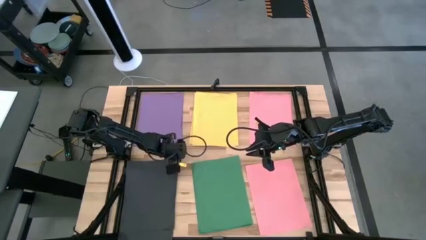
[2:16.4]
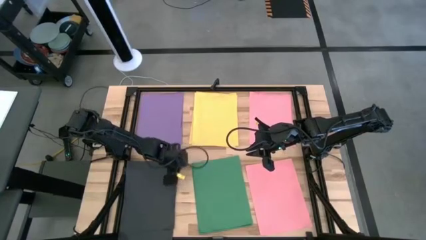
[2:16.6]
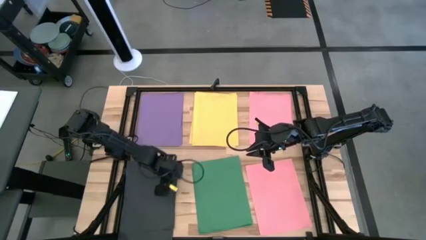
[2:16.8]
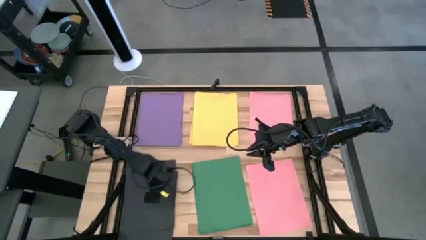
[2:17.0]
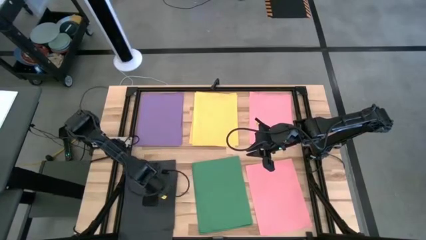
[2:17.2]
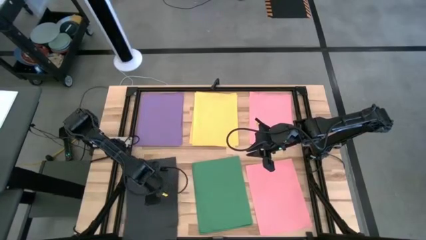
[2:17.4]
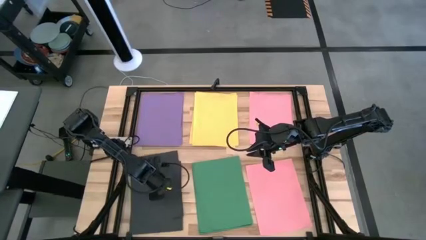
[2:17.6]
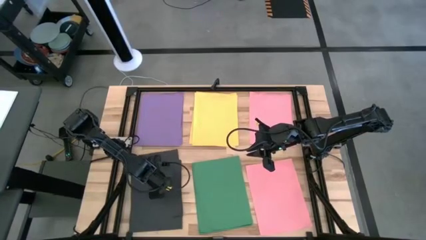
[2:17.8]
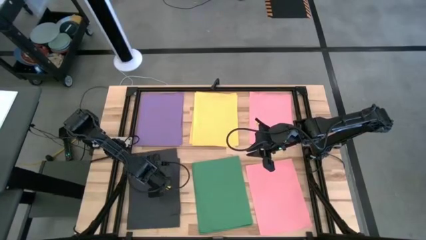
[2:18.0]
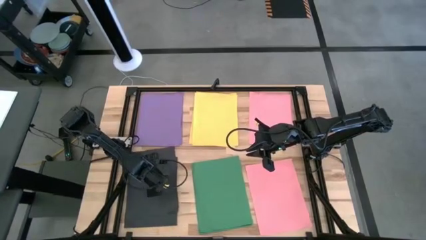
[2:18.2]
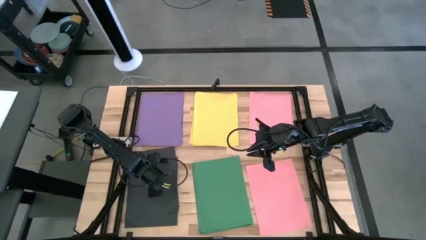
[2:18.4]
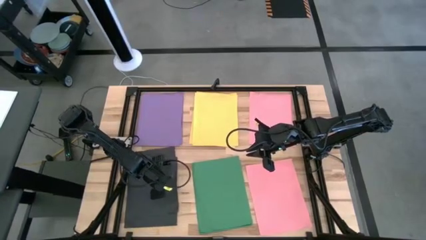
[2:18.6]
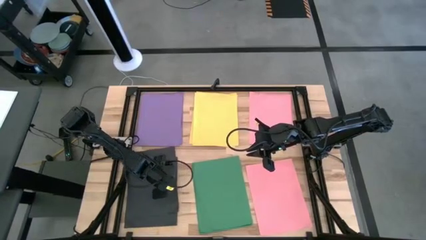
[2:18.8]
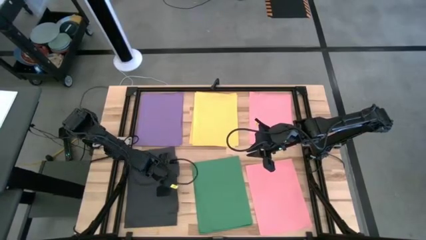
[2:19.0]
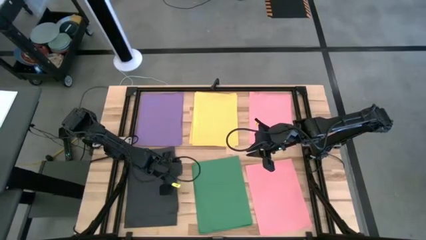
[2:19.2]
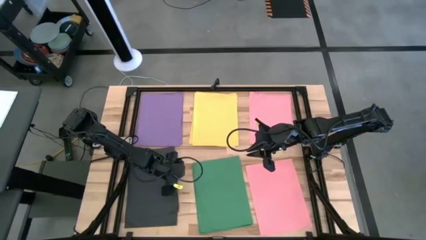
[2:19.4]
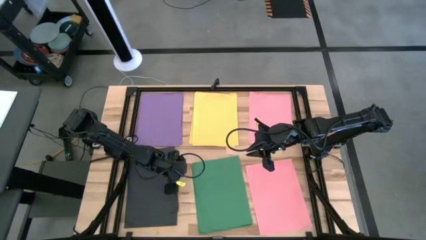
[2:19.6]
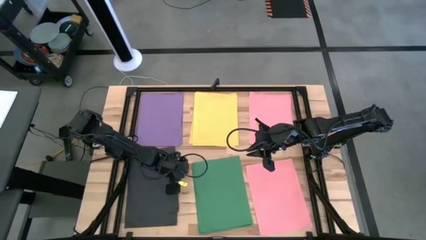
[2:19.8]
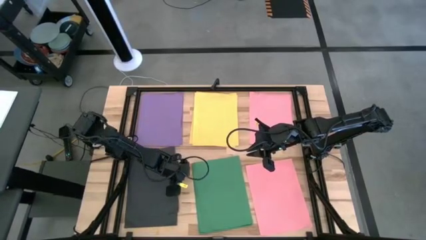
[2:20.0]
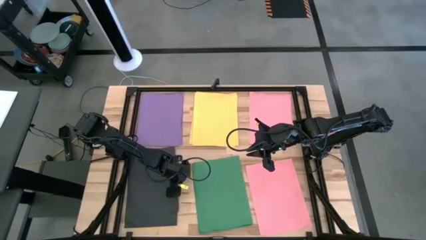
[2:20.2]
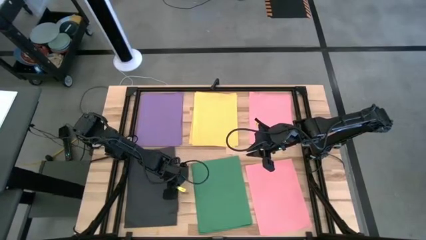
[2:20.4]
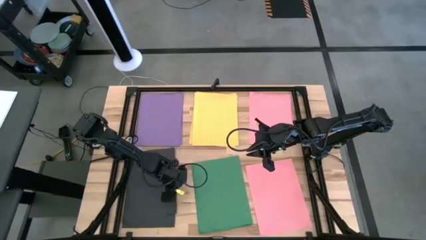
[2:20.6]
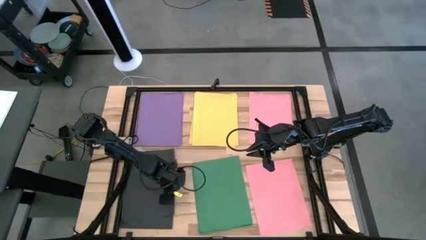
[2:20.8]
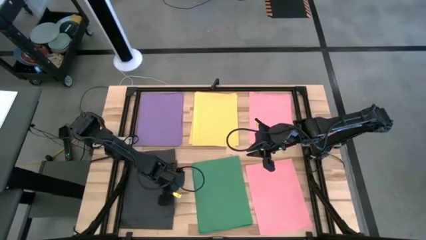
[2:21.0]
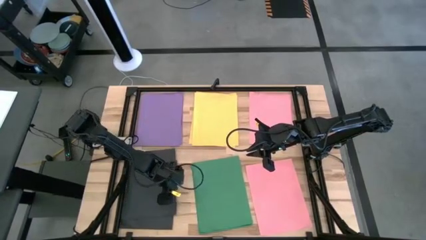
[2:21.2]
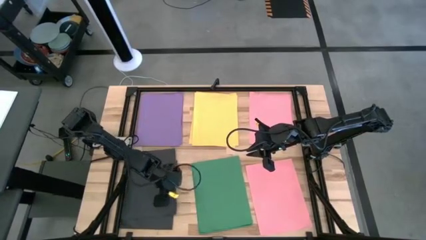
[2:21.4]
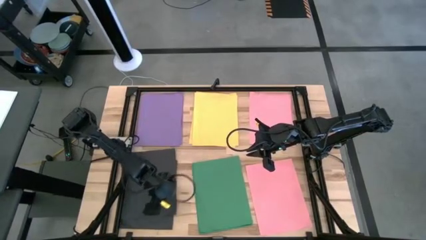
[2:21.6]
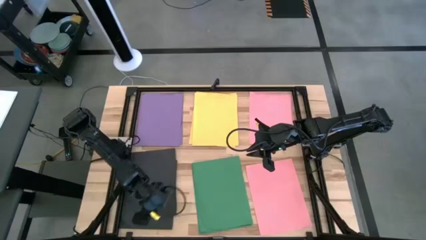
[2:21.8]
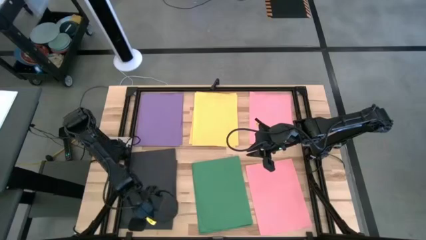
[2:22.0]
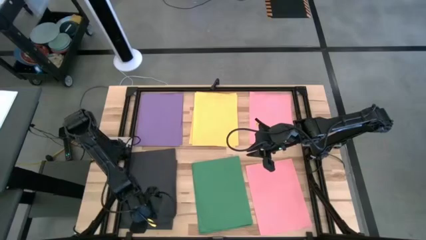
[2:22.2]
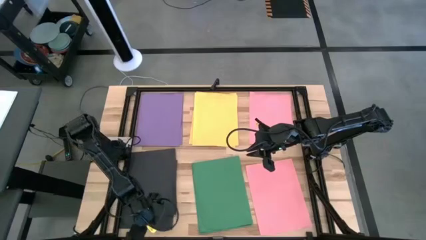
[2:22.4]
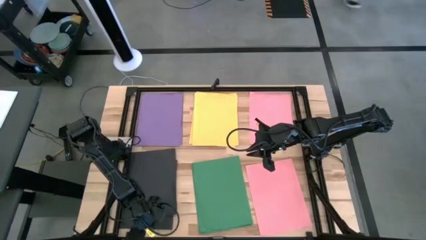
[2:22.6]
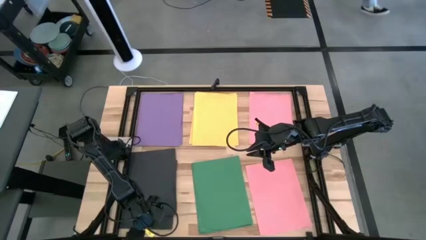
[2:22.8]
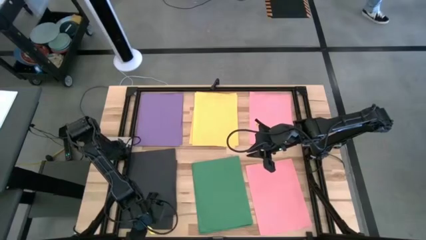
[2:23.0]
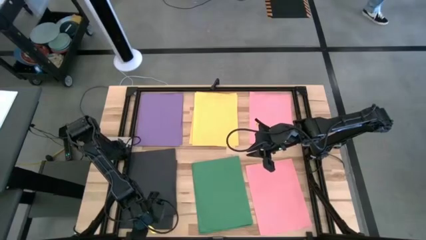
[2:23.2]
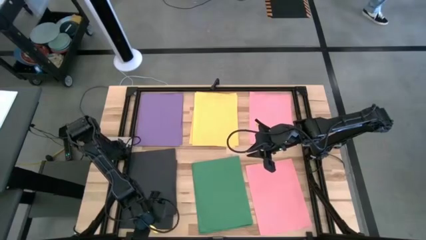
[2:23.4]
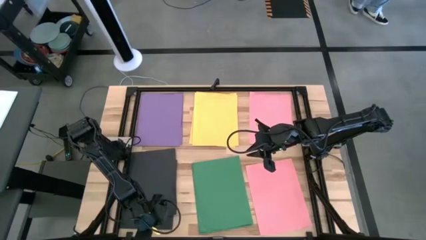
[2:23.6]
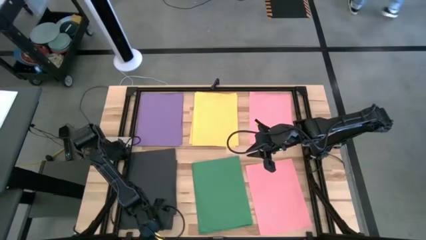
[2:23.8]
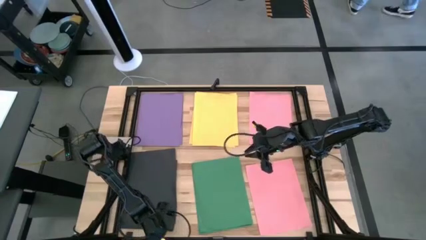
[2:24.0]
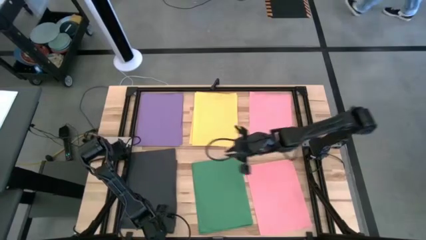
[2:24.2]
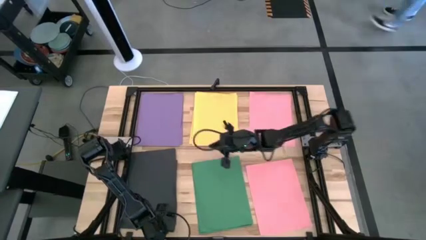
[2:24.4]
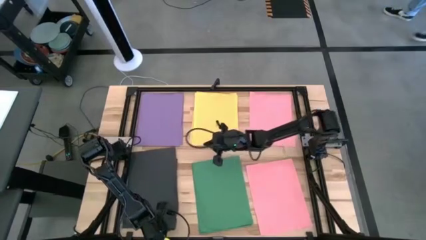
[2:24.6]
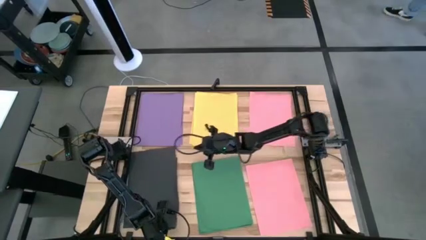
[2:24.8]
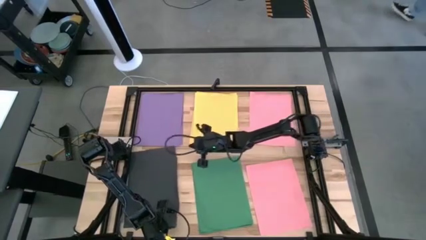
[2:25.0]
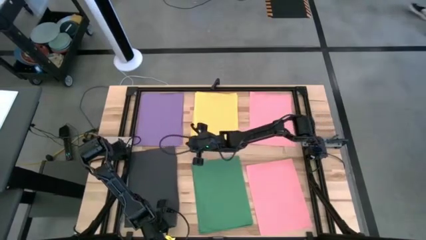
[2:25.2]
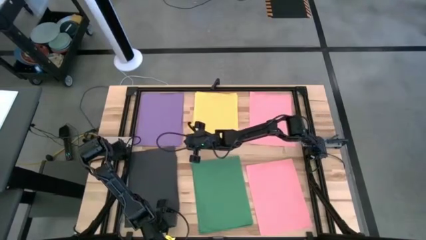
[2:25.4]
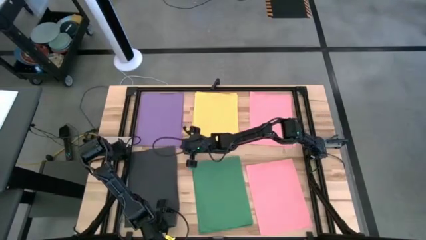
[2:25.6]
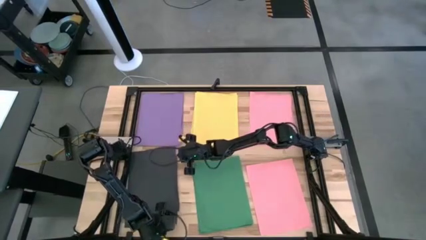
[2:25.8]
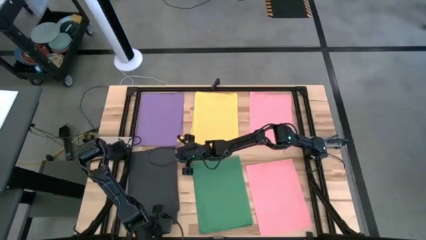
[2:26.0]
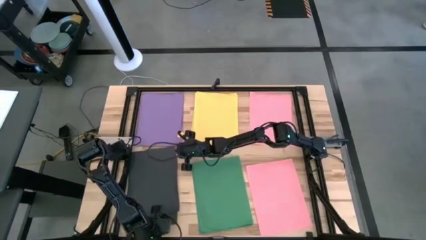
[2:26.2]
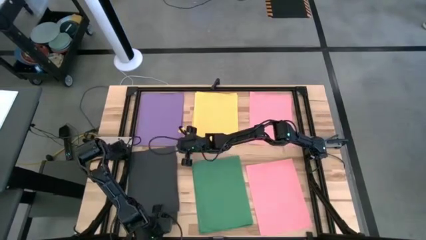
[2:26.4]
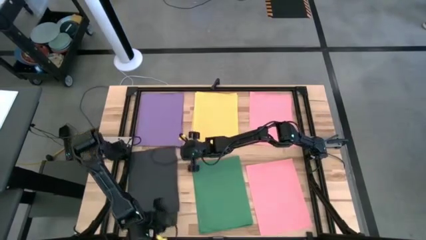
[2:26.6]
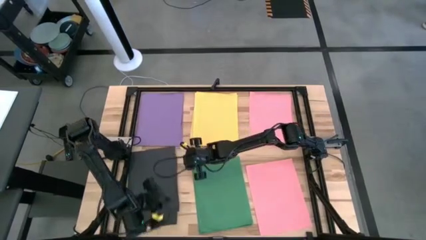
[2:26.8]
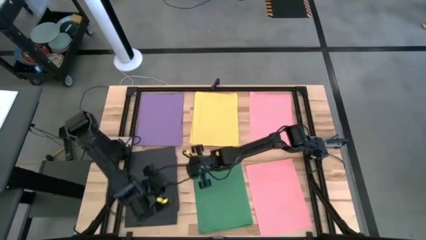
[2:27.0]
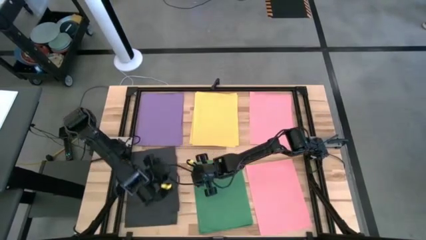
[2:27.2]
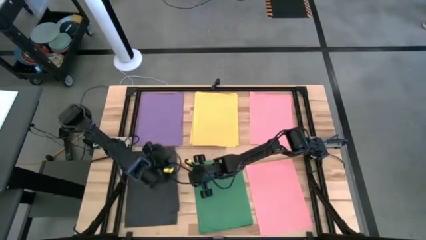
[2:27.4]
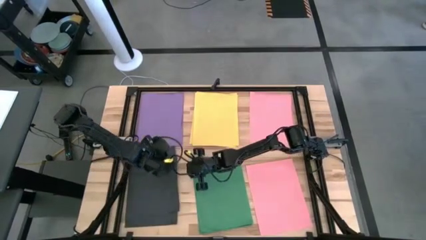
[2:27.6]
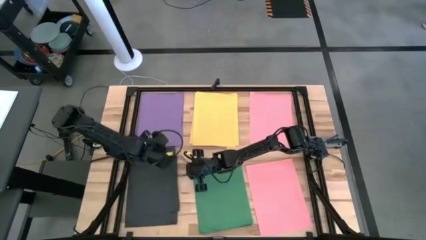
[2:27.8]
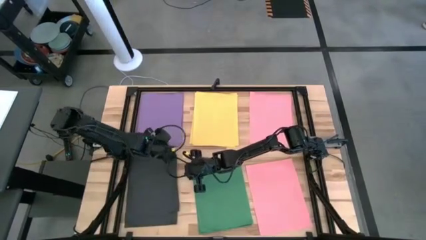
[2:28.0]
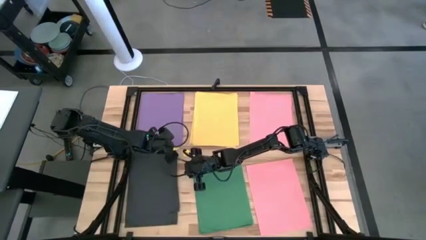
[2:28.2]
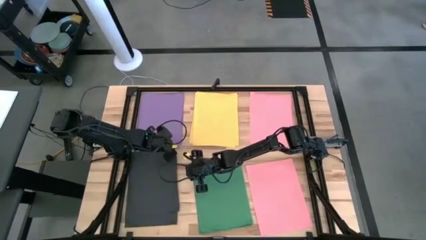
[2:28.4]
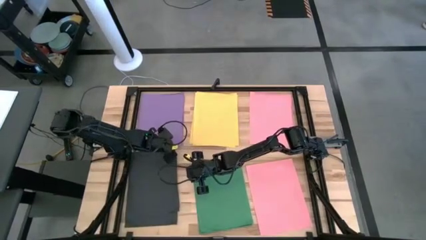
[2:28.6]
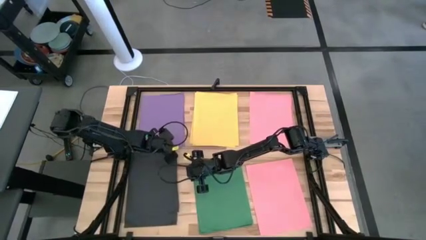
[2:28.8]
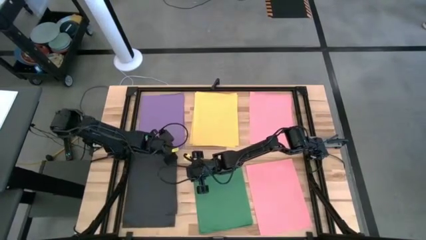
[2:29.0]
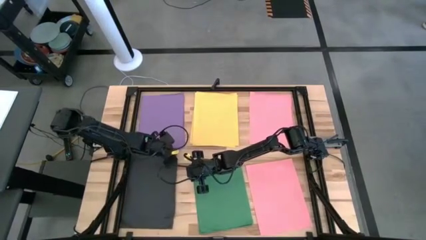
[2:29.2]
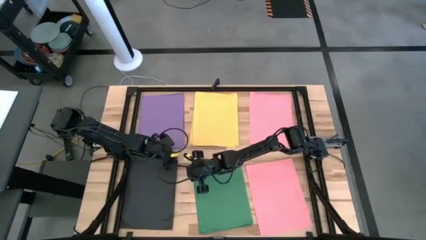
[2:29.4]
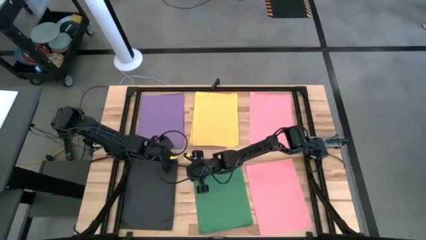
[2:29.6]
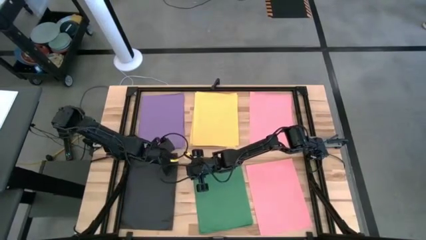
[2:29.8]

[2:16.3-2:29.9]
Task: Organize paper
Adjust the black paper

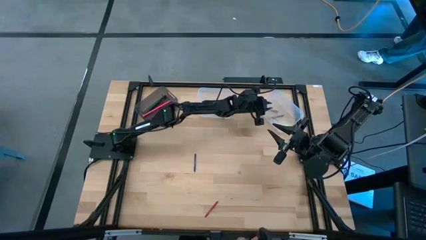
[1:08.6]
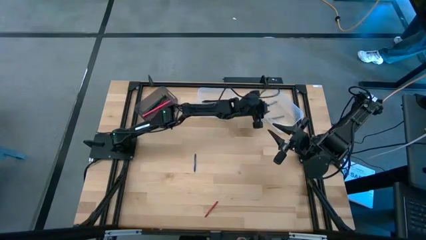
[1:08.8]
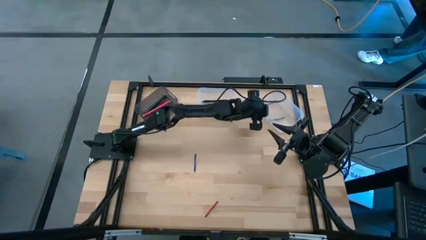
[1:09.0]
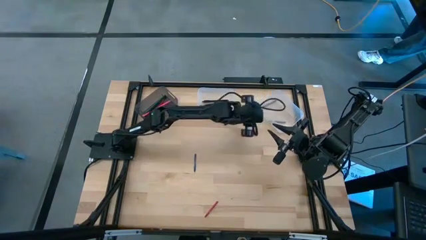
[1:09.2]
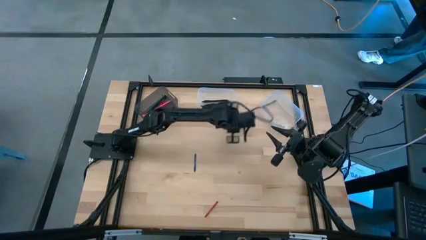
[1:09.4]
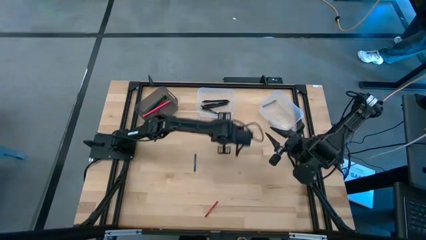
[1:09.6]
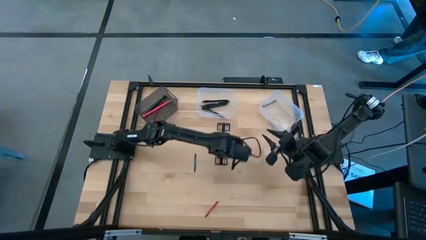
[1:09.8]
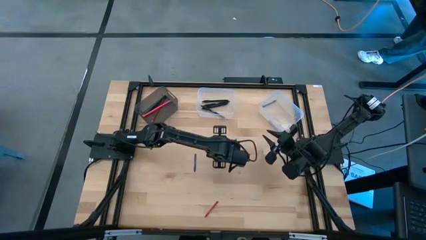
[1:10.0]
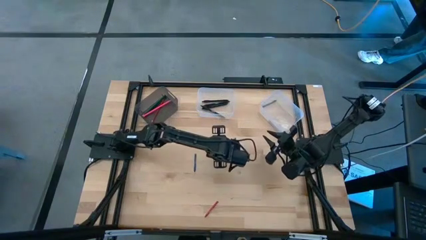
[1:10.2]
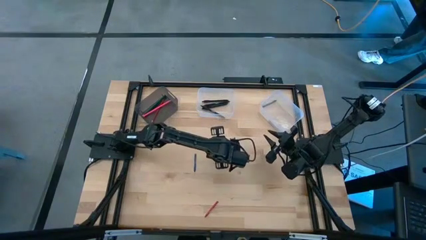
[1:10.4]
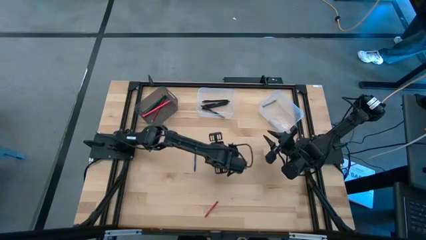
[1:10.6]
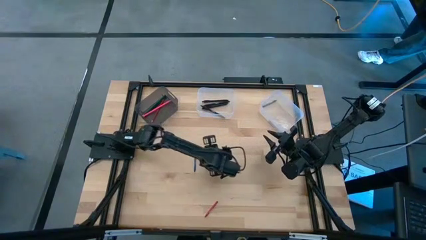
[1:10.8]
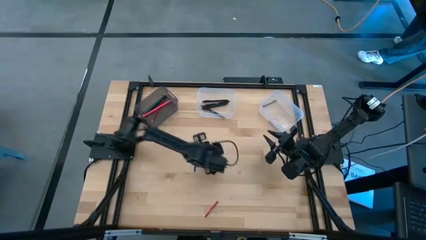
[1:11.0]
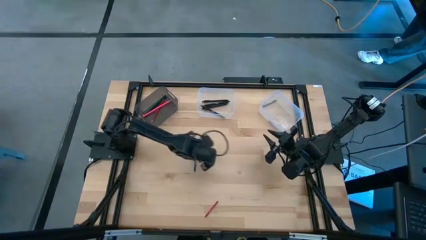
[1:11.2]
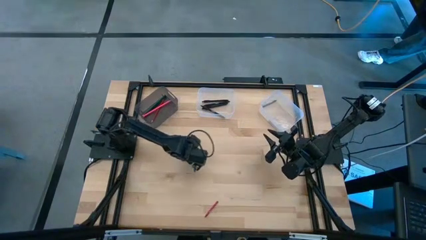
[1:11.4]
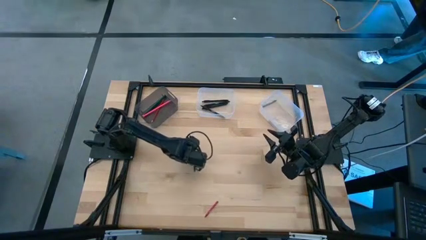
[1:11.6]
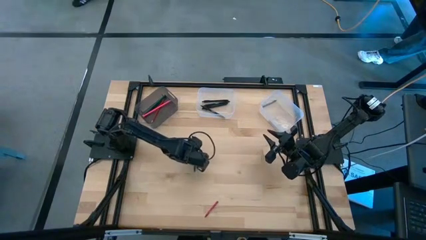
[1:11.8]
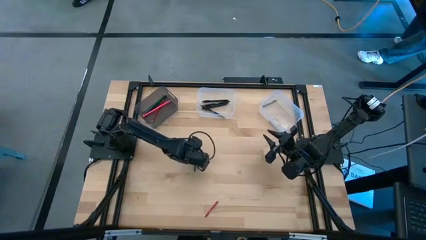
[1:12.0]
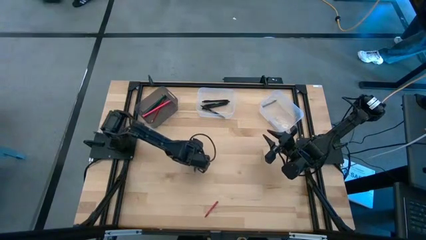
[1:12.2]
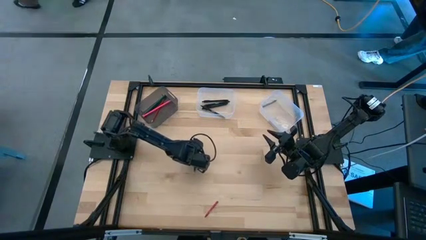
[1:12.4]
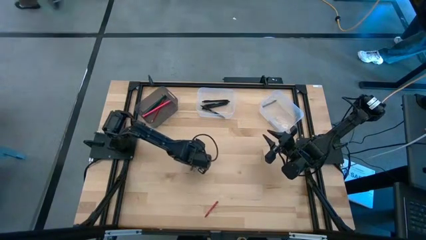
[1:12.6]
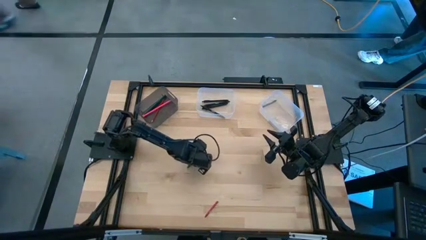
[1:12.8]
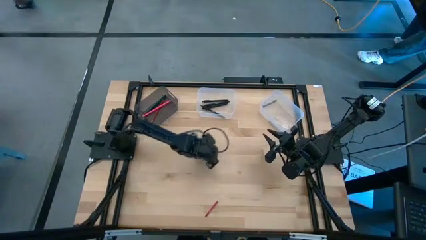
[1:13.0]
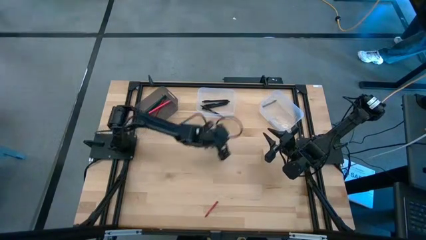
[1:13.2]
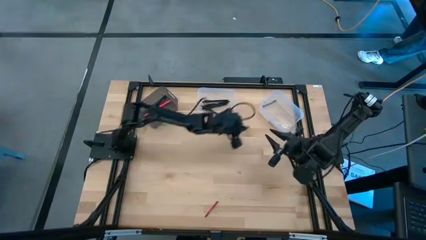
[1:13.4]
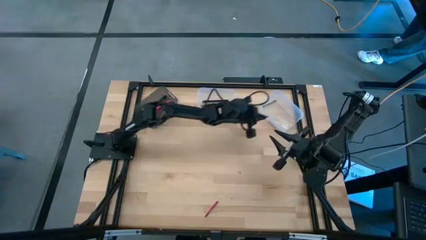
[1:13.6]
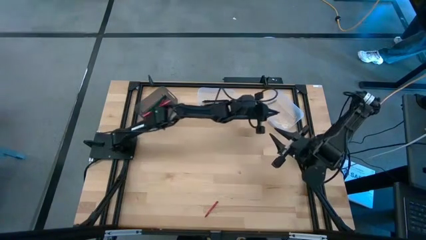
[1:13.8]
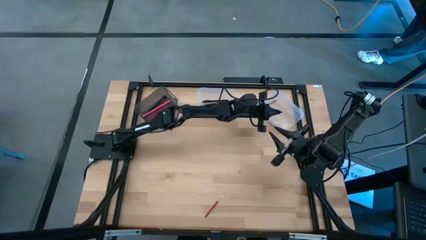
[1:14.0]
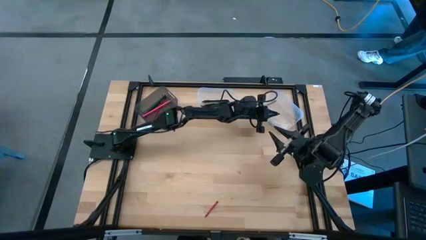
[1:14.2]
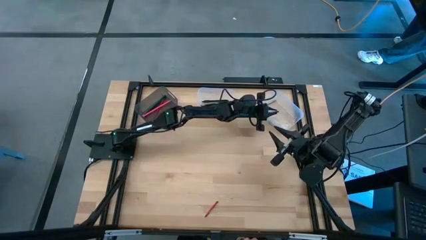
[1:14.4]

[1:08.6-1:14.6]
Task: Sort crayons/erasers/pens/pencils in bins
Put the blue crayon into the right transparent bin
